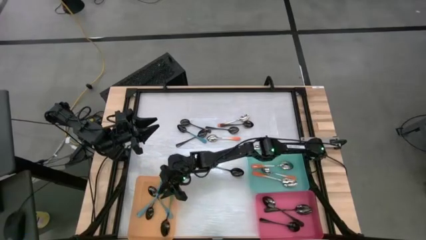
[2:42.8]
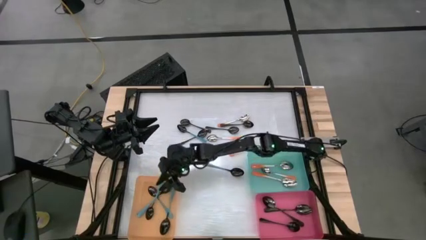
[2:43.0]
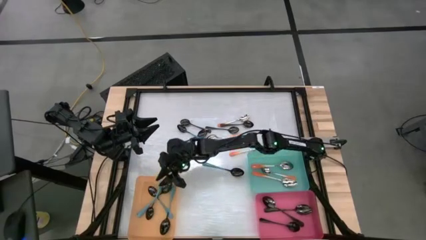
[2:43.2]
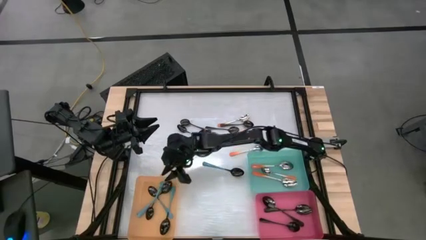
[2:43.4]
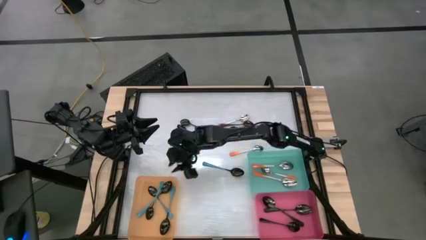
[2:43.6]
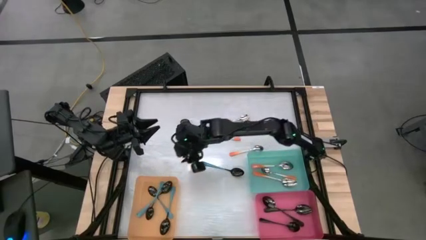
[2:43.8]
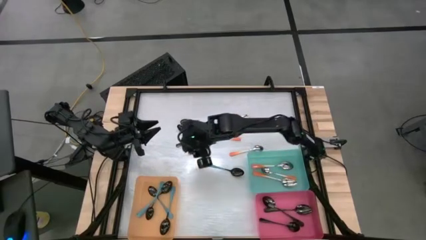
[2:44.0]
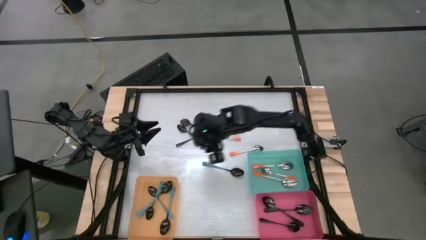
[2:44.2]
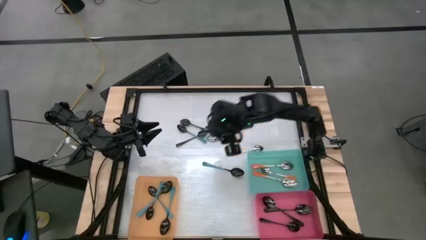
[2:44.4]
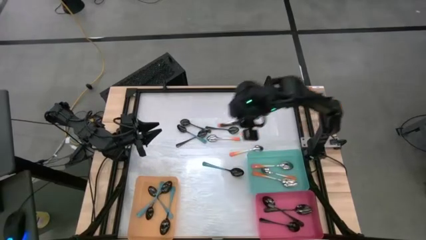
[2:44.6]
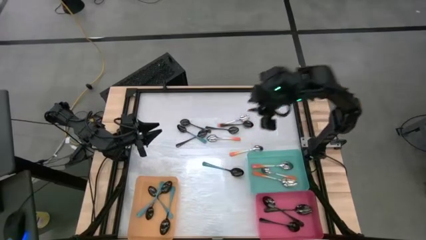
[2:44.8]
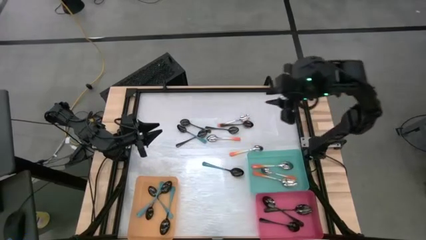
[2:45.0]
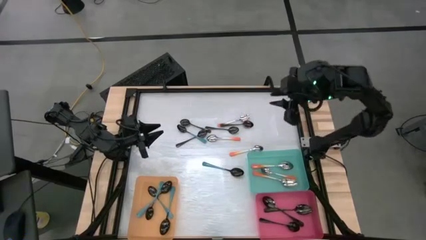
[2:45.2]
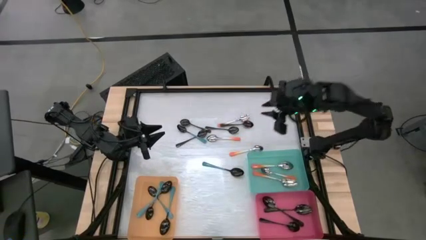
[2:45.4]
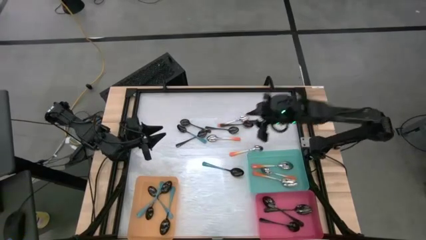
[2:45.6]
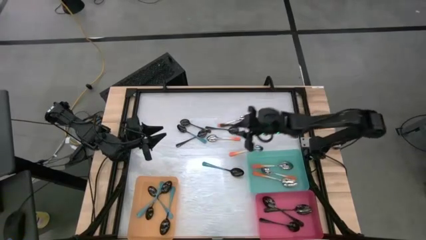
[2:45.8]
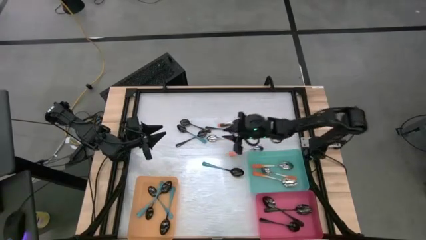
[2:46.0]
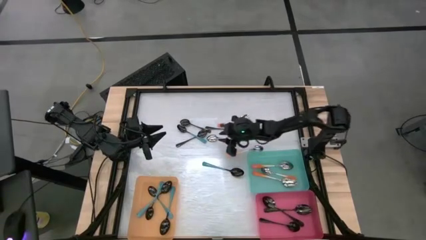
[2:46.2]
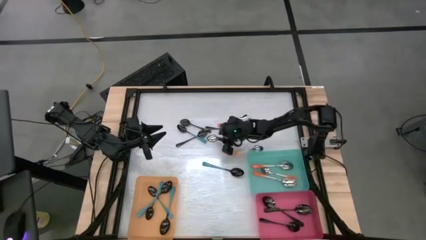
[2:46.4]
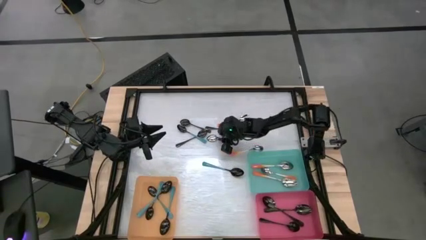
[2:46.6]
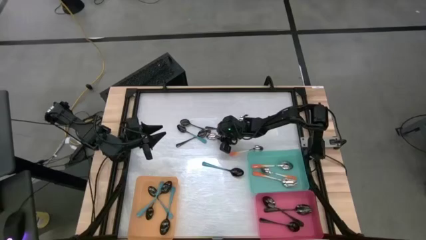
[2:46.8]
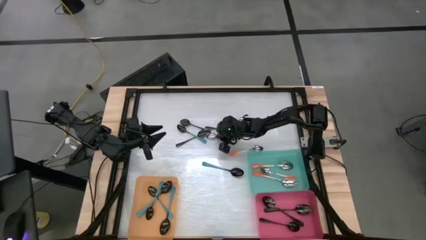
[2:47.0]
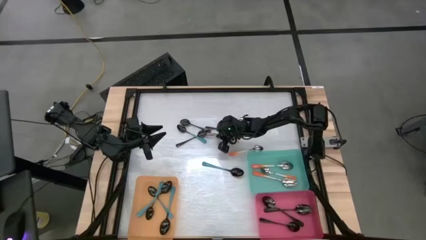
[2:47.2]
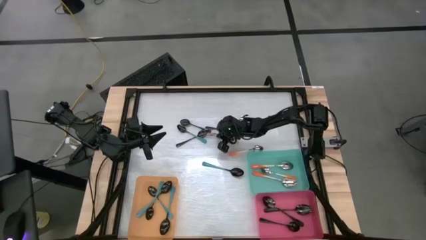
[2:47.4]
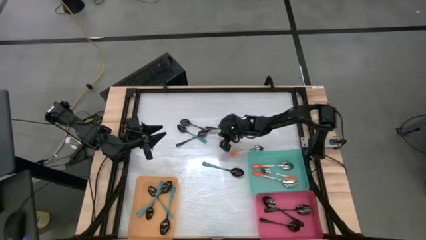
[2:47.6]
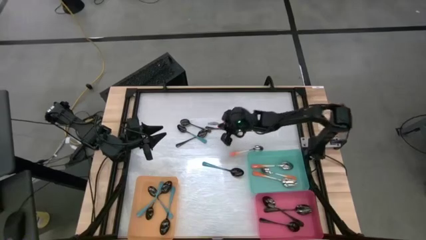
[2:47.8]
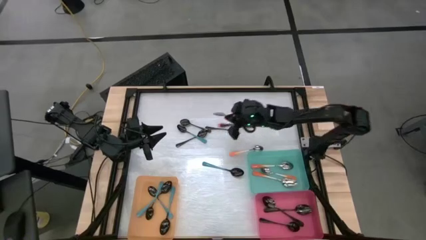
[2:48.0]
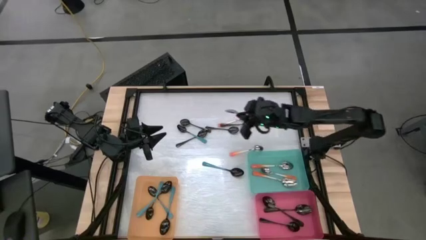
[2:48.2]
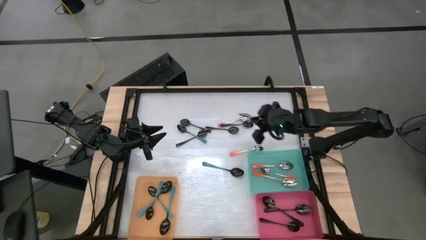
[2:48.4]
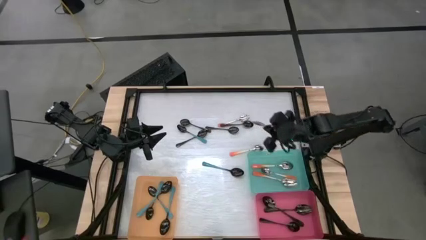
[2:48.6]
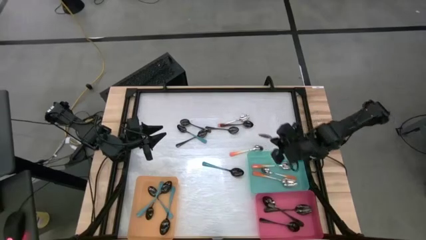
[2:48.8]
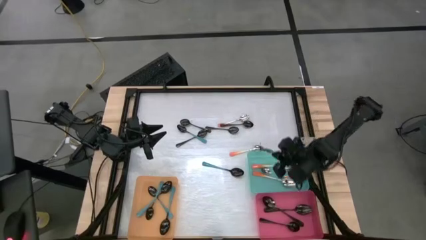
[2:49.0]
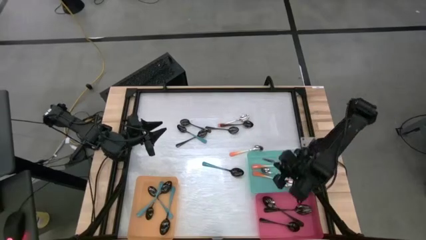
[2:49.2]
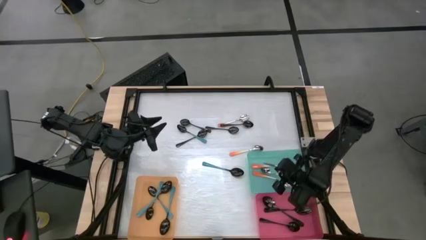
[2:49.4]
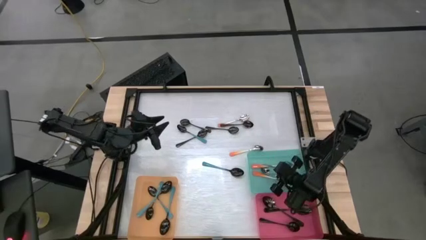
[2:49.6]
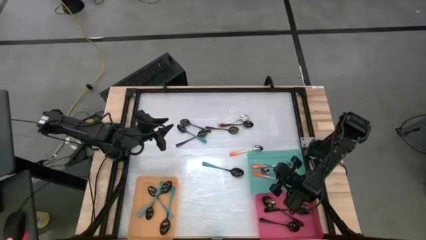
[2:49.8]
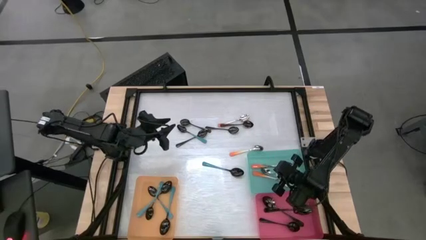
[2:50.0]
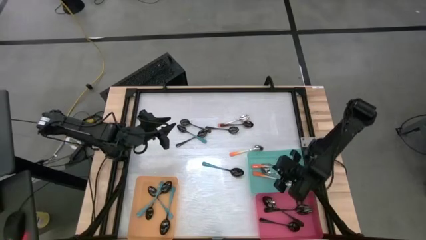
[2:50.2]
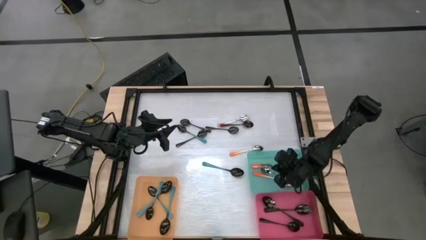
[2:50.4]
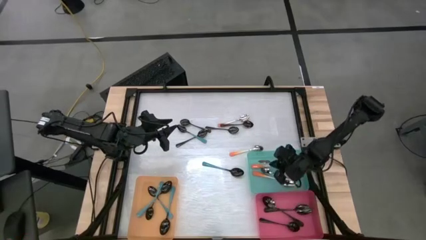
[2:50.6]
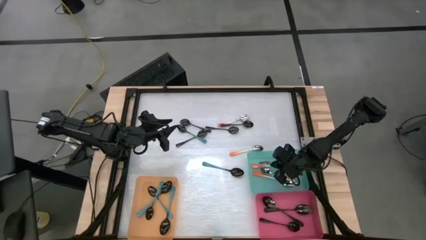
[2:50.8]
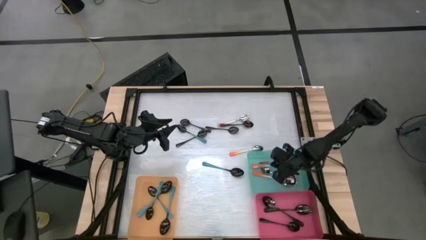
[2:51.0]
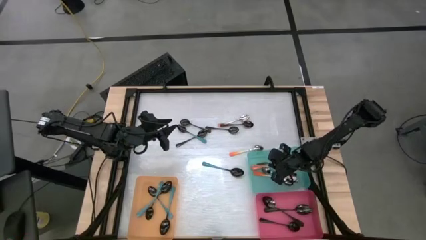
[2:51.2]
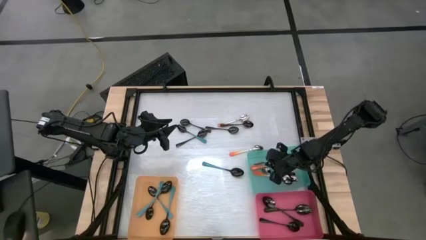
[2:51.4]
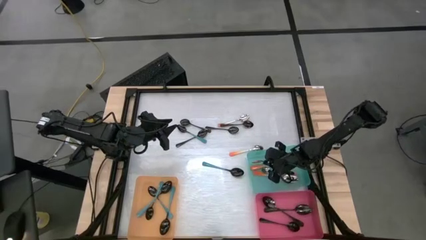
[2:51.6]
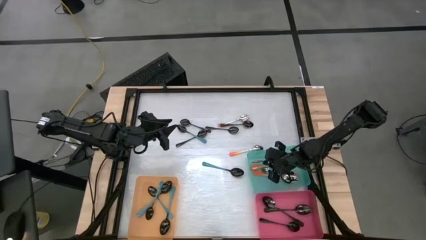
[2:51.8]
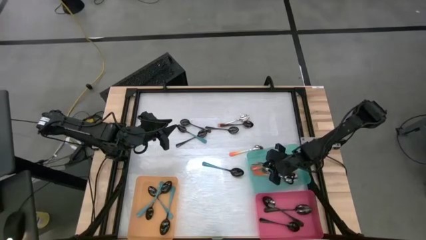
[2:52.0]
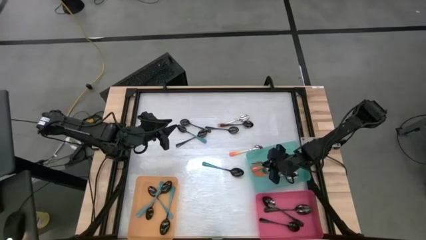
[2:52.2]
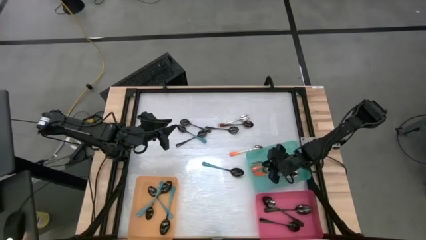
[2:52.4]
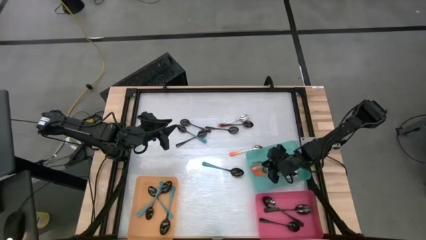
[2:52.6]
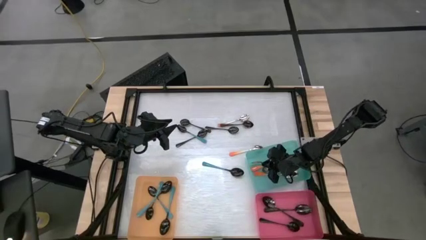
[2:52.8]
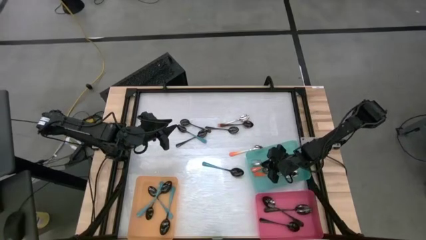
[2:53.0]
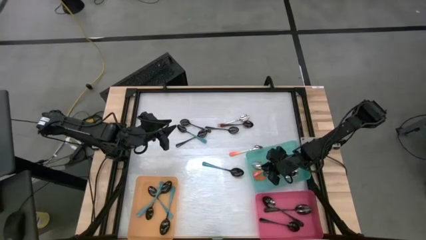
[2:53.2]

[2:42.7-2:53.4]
Task: Sort silverware by color (type)
Put the orange spoon into the blue bin

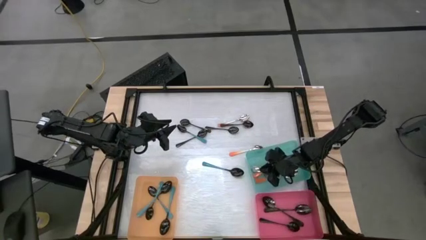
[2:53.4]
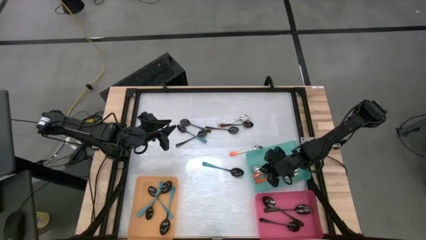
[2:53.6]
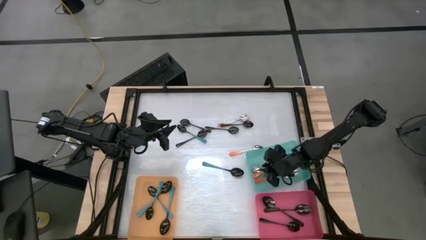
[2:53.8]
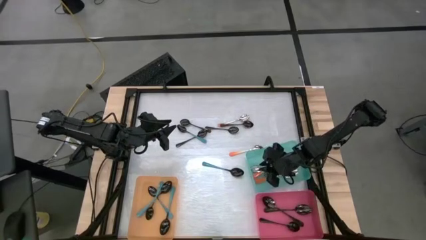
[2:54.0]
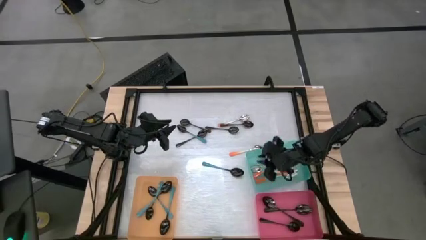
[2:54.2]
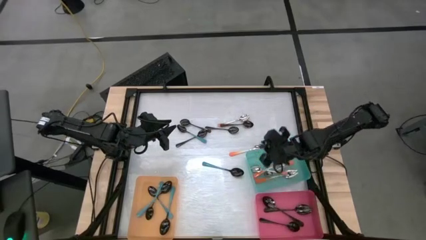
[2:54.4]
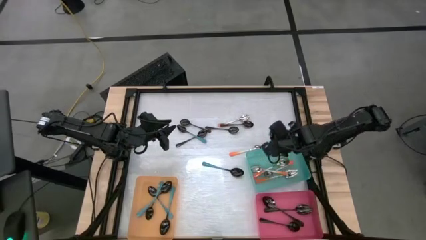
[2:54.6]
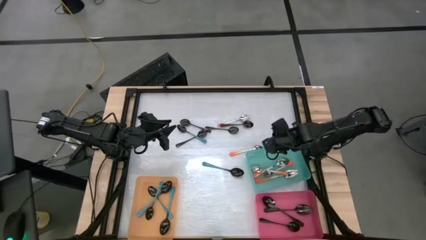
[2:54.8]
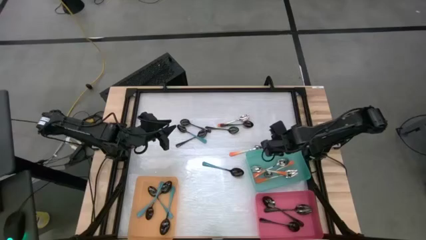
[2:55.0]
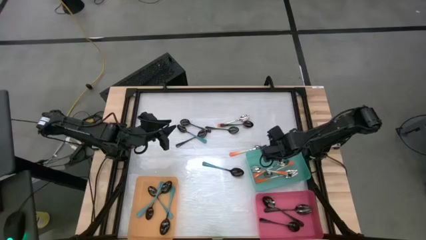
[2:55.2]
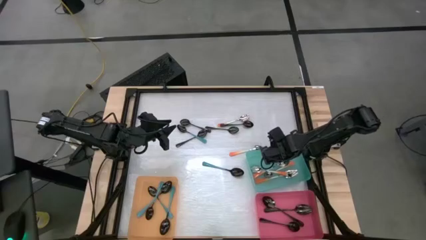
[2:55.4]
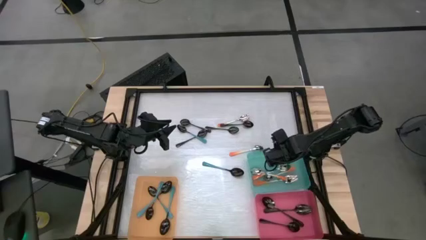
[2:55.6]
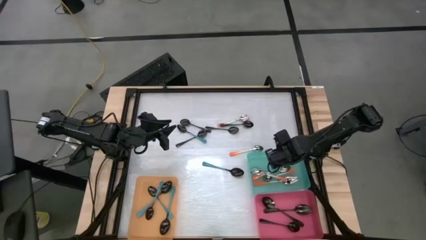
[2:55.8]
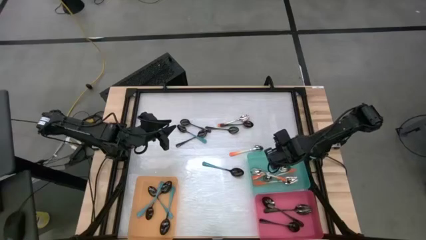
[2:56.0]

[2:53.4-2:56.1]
Adjust the blue bin on the table
